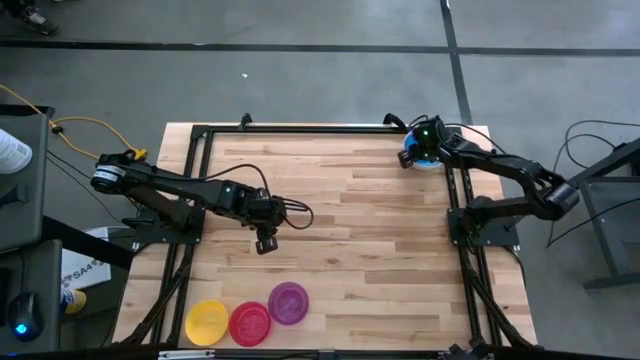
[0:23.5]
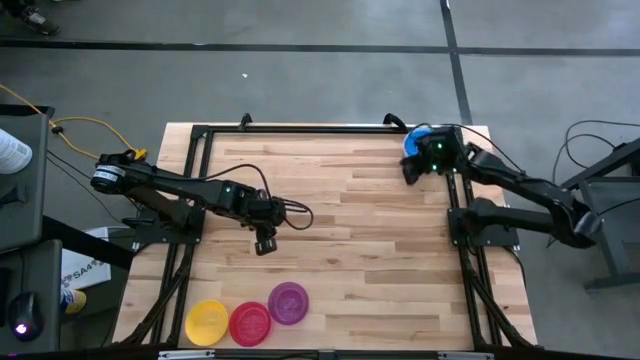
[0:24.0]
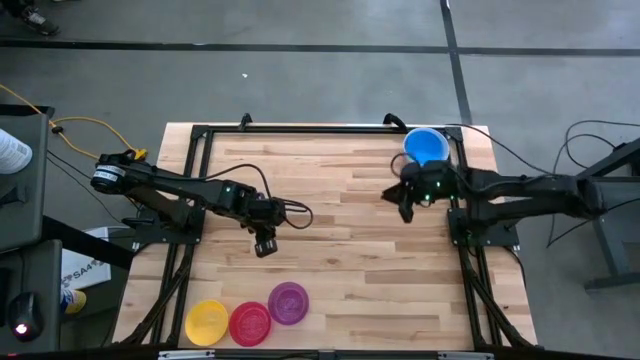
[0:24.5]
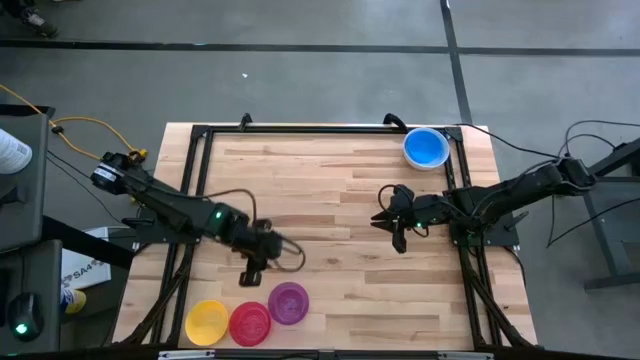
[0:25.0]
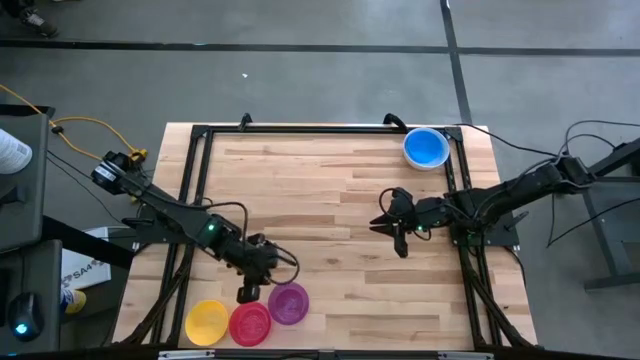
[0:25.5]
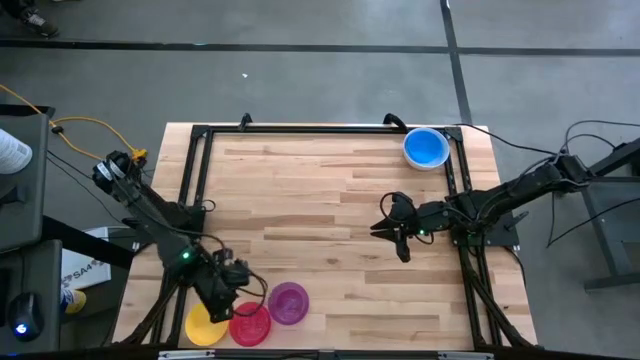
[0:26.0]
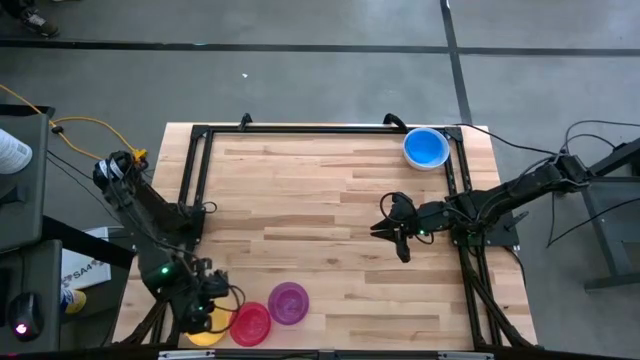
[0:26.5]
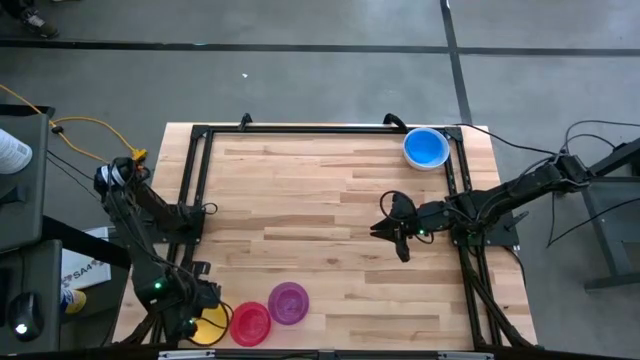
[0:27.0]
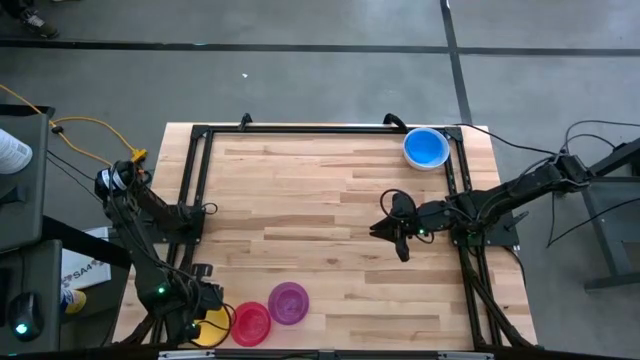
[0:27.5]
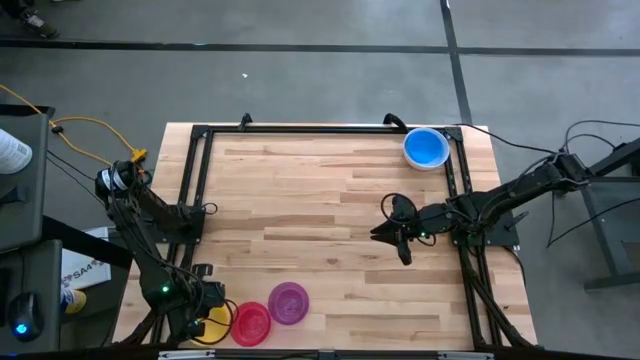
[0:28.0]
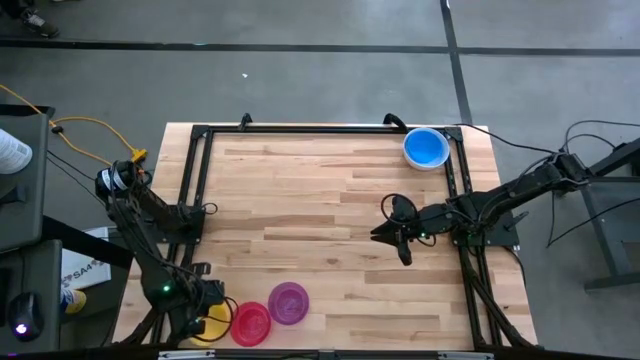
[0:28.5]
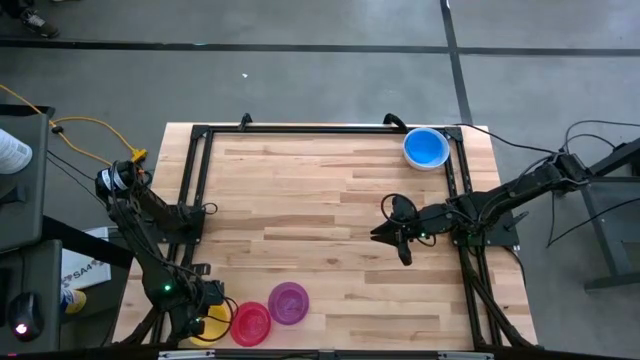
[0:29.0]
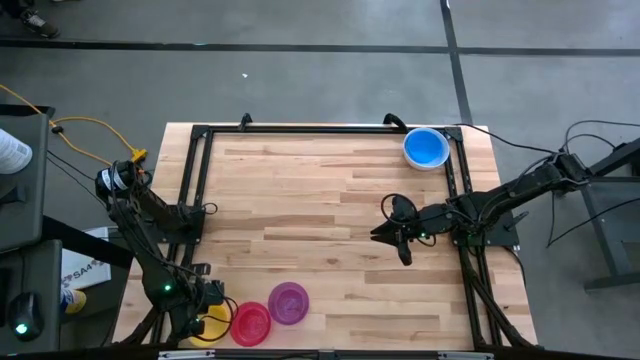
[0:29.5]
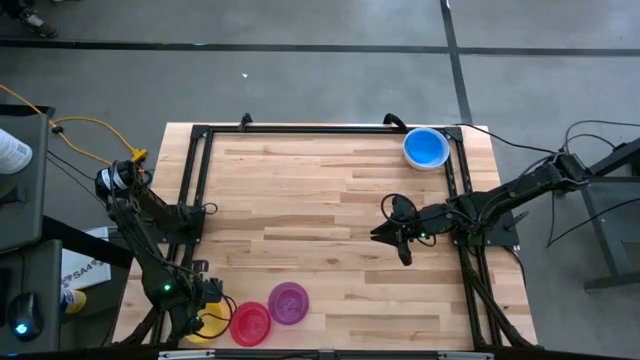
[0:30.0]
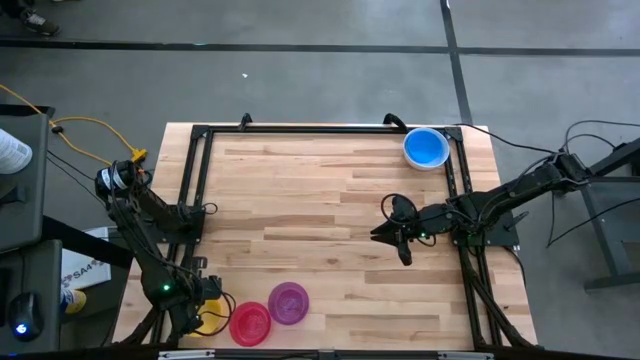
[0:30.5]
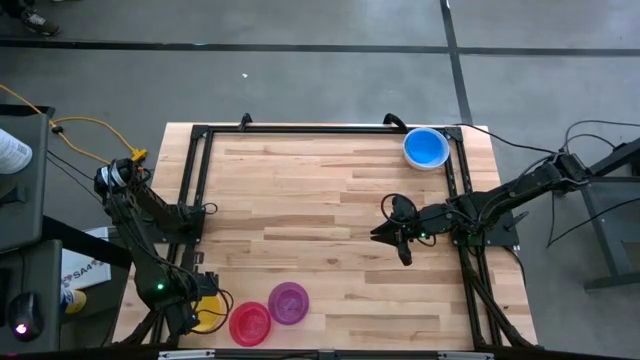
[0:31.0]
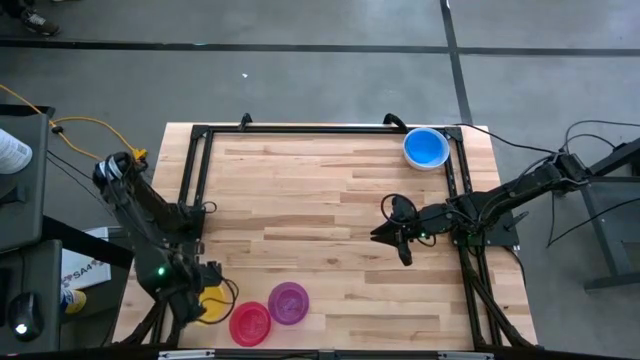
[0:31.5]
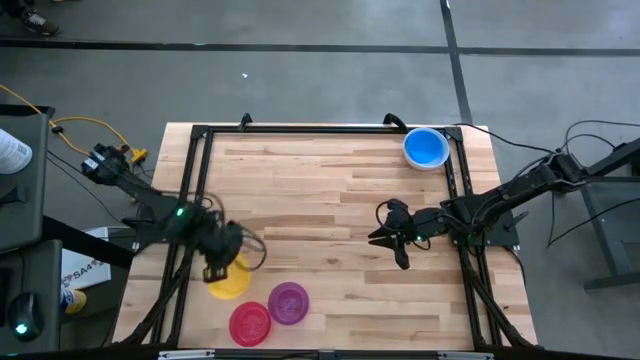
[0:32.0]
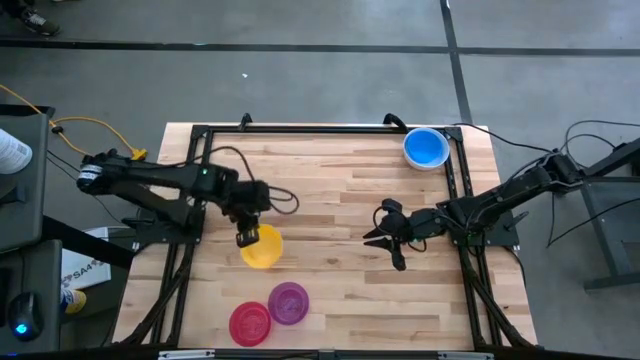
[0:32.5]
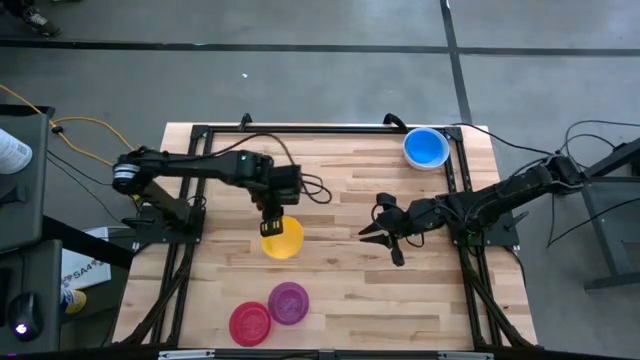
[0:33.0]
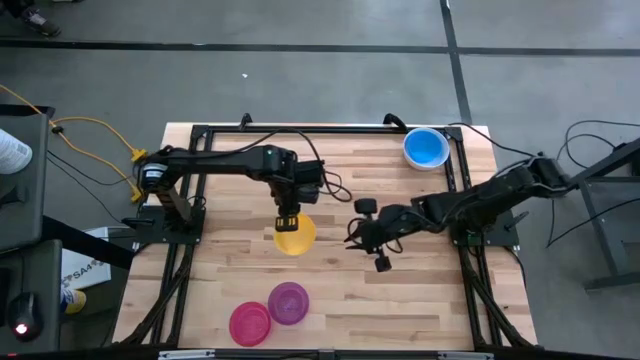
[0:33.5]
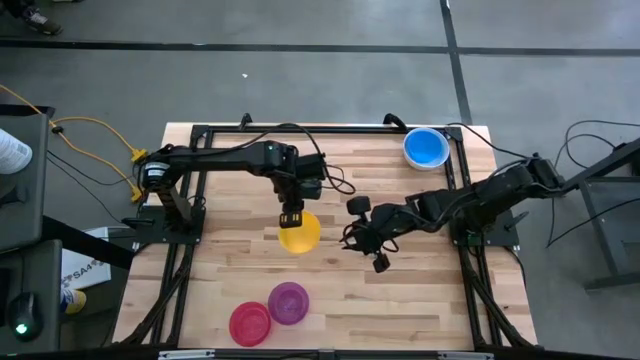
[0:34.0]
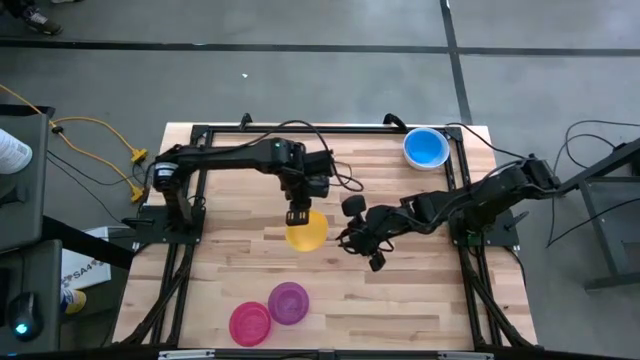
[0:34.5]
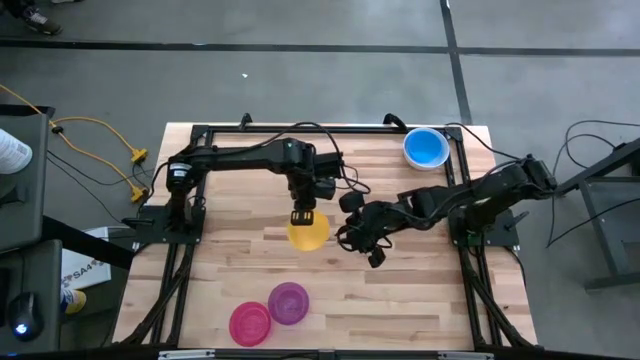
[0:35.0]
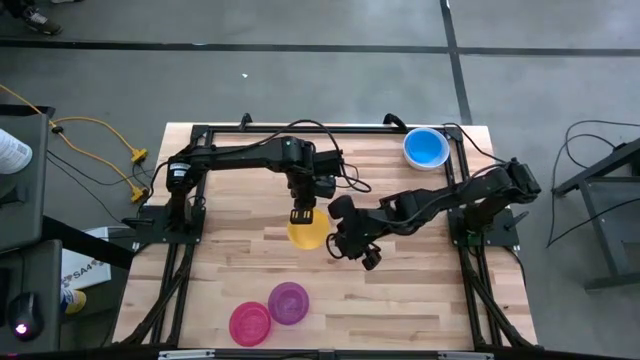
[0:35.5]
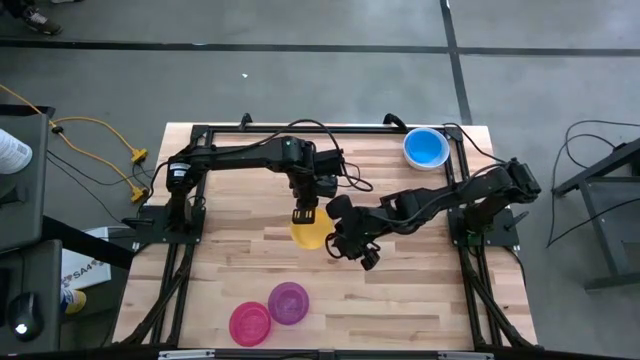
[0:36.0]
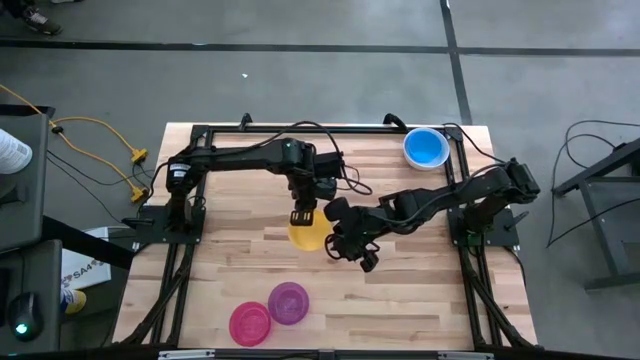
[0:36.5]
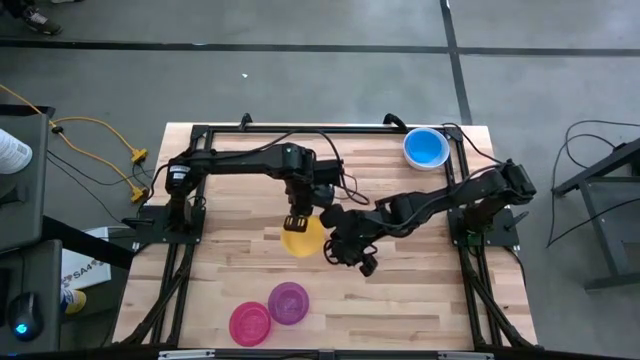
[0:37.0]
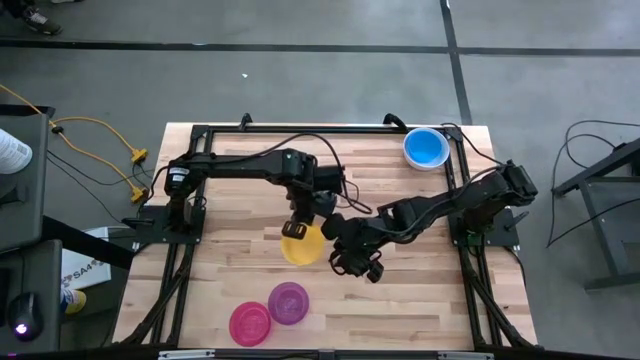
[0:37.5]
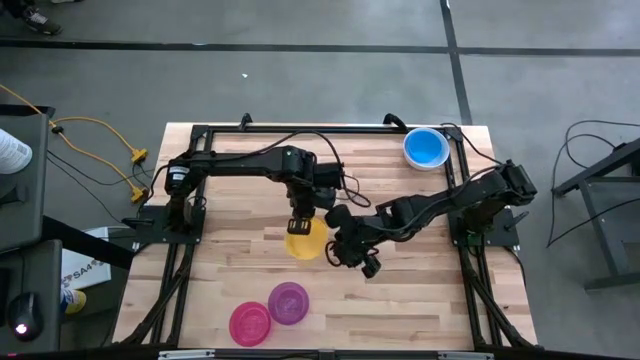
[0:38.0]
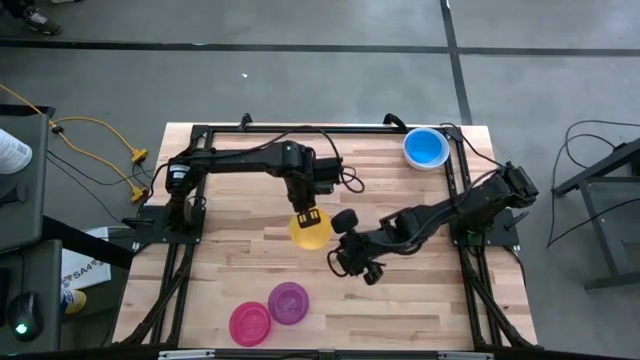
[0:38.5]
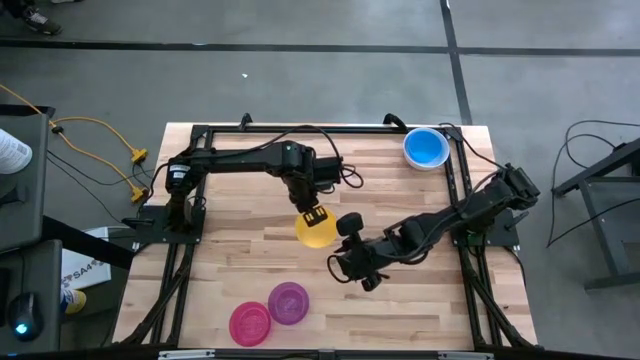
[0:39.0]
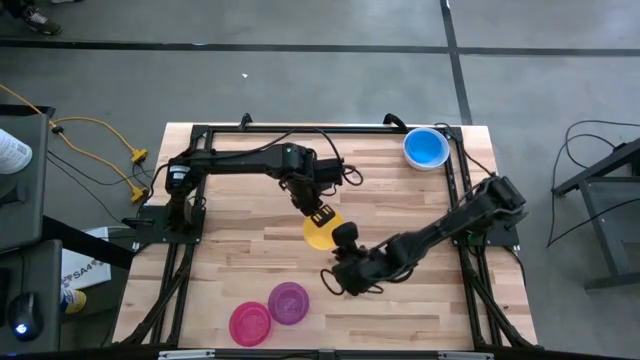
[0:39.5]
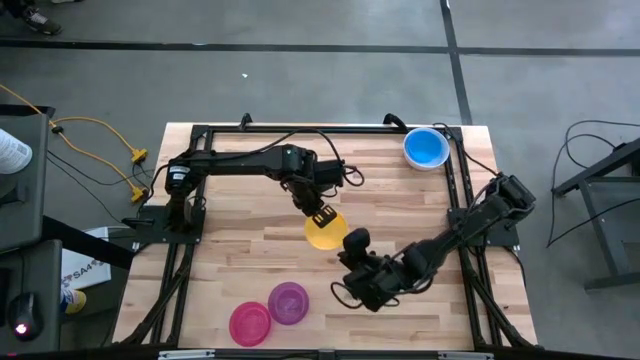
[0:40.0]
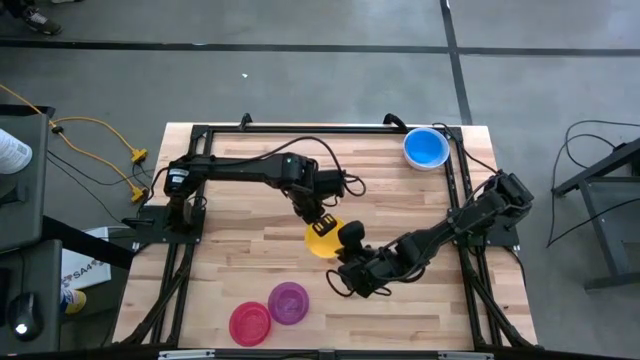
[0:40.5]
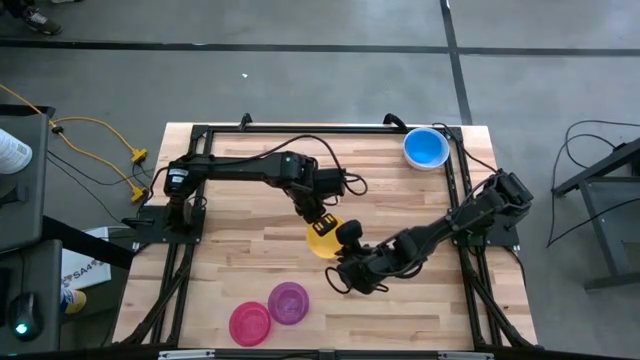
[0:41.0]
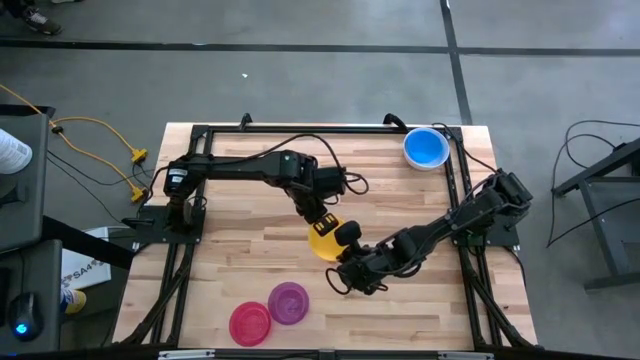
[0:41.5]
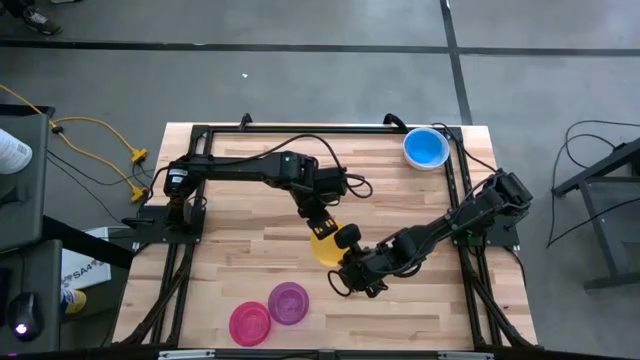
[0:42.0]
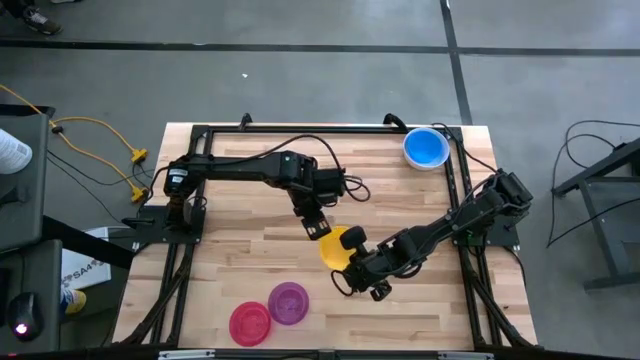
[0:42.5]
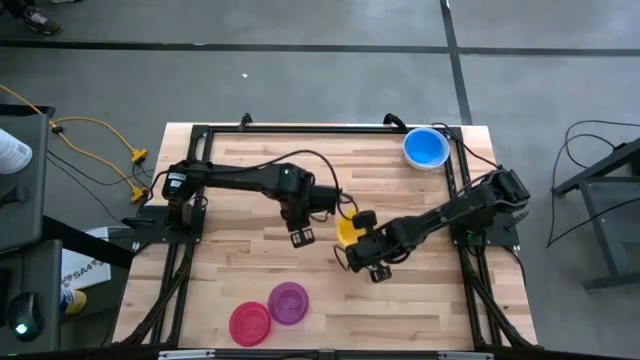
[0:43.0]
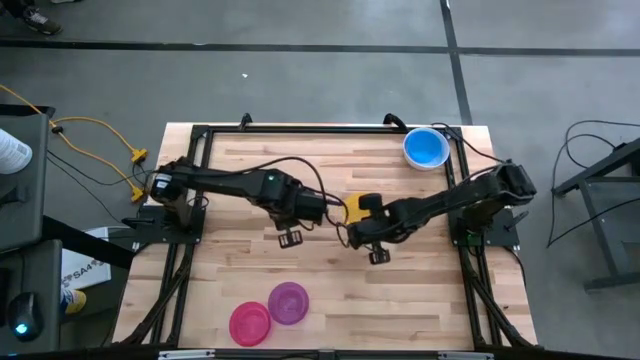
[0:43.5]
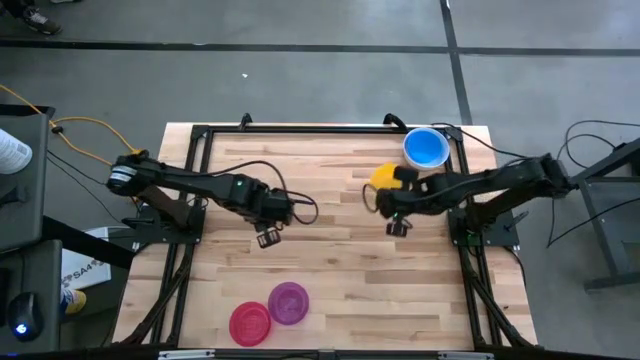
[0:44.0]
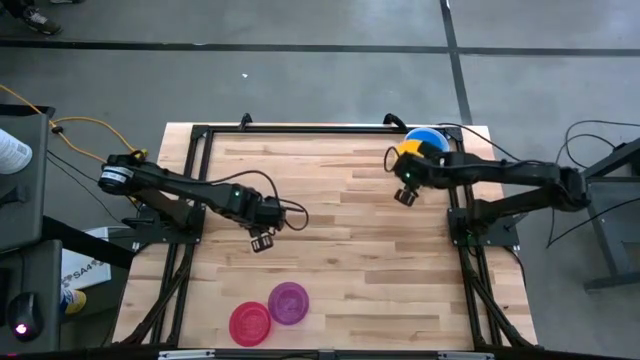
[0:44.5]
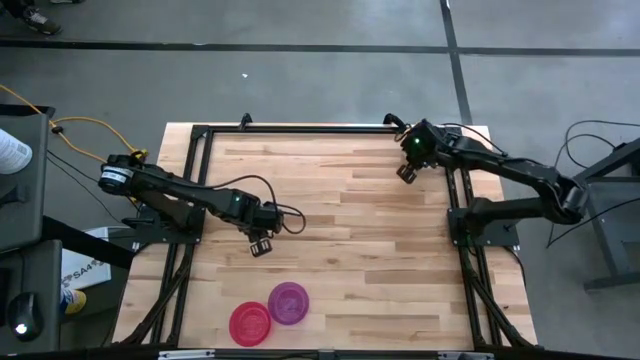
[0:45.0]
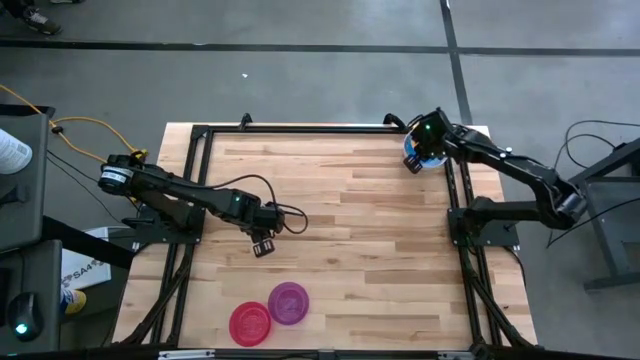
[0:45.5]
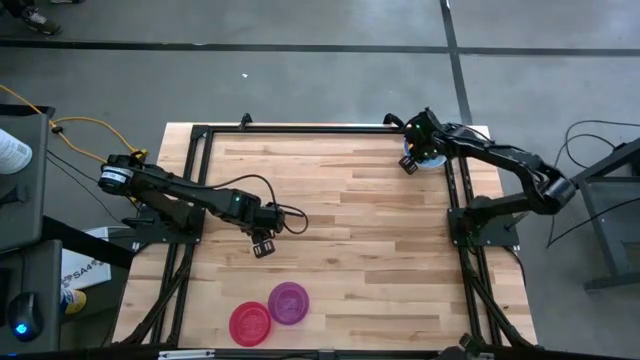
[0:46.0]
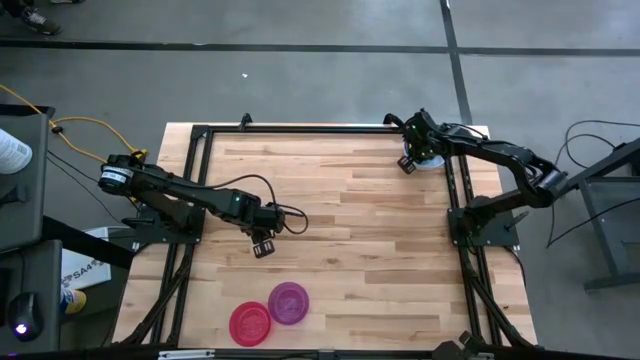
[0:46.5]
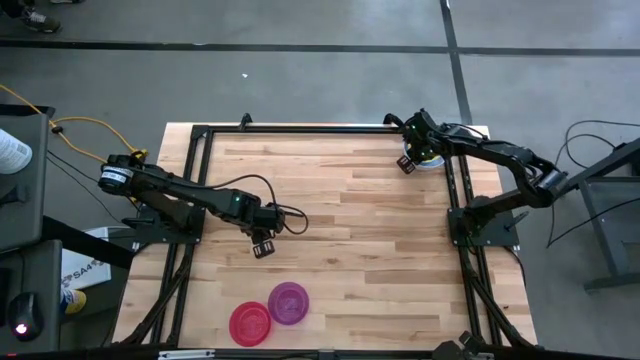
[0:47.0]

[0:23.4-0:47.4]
Stack the yellow bowl on the blue bowl
